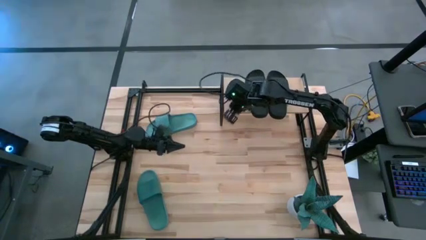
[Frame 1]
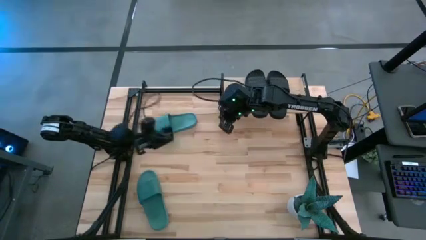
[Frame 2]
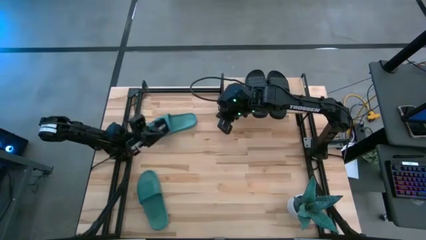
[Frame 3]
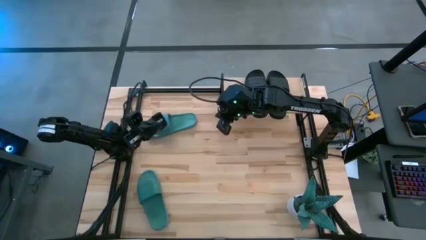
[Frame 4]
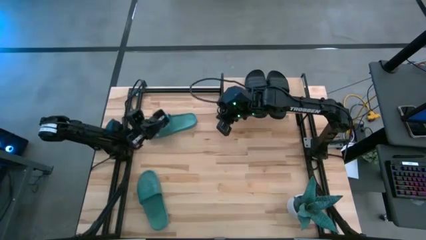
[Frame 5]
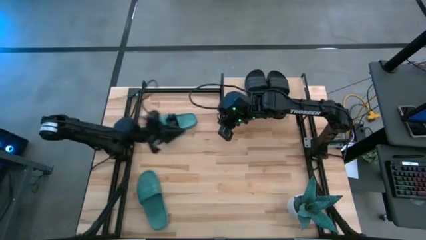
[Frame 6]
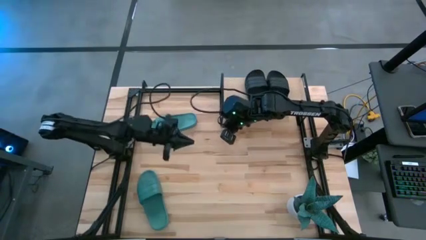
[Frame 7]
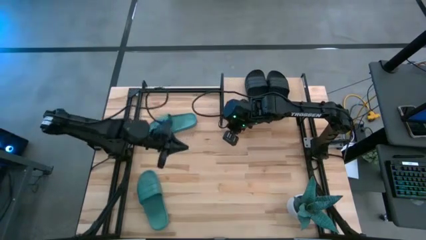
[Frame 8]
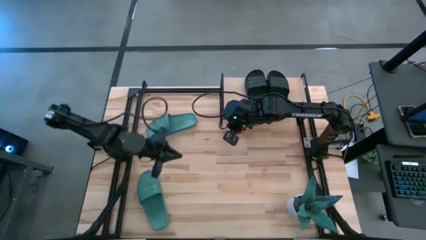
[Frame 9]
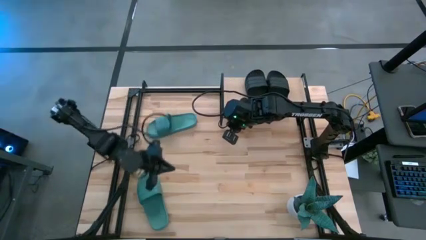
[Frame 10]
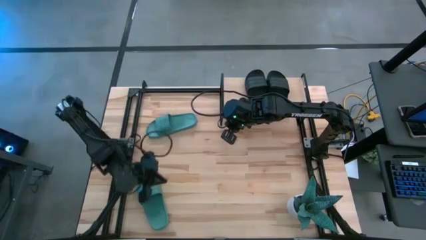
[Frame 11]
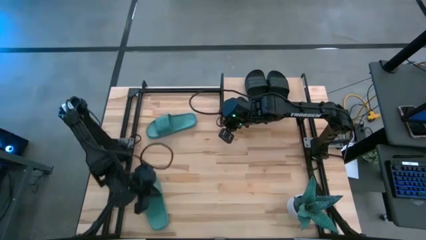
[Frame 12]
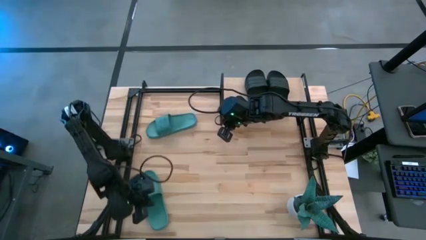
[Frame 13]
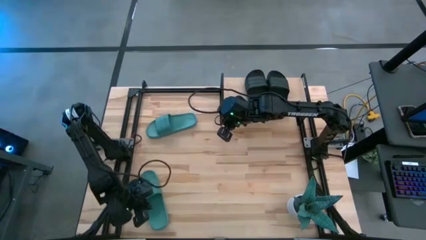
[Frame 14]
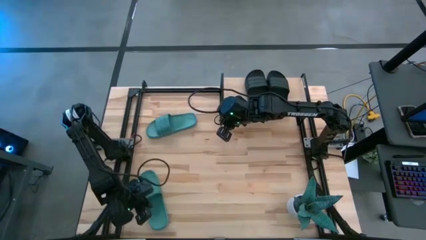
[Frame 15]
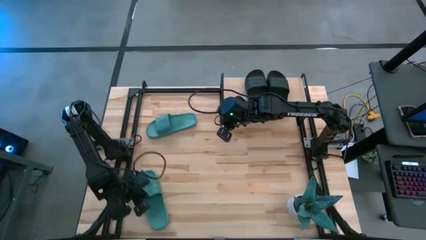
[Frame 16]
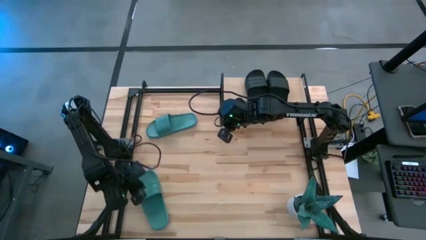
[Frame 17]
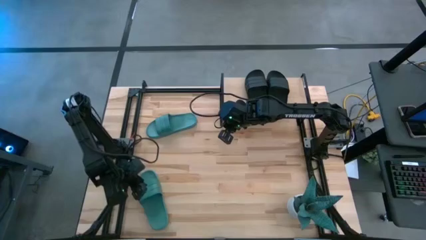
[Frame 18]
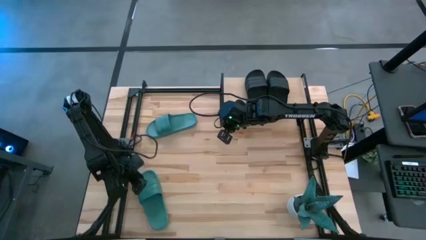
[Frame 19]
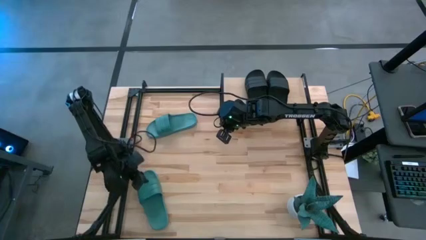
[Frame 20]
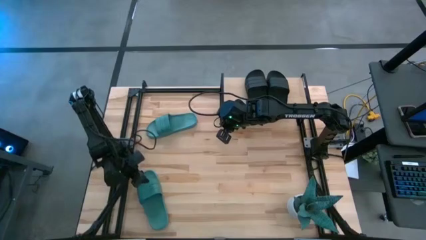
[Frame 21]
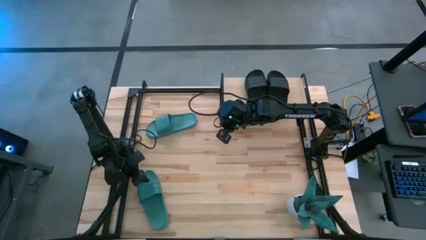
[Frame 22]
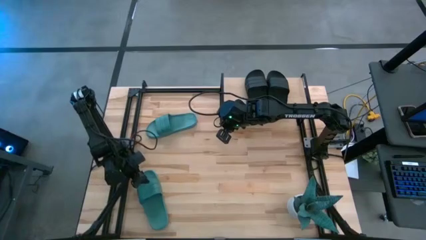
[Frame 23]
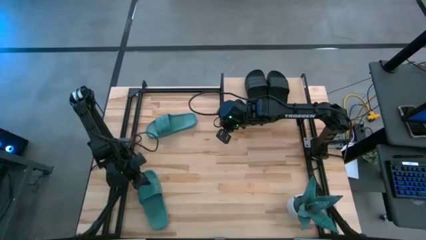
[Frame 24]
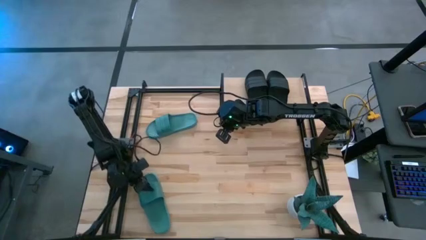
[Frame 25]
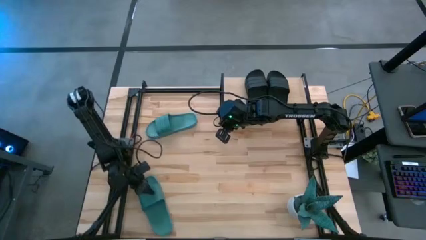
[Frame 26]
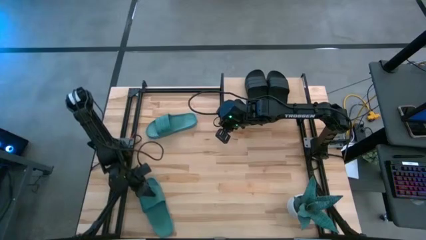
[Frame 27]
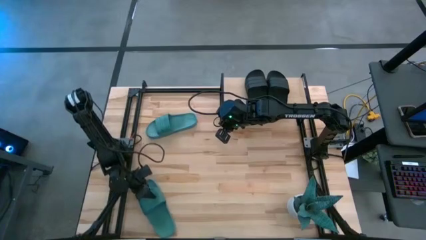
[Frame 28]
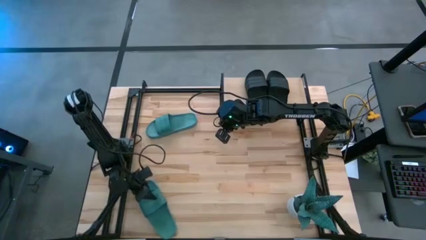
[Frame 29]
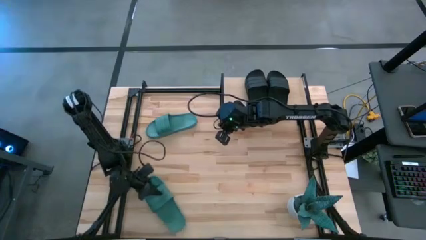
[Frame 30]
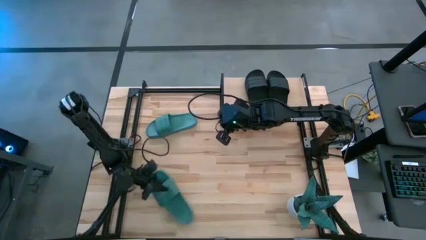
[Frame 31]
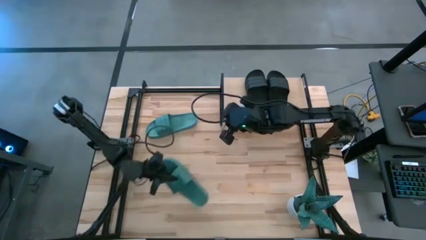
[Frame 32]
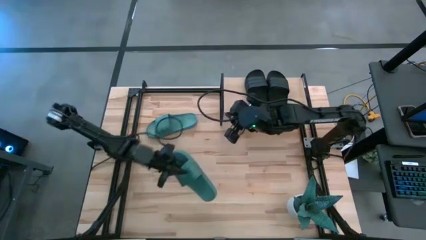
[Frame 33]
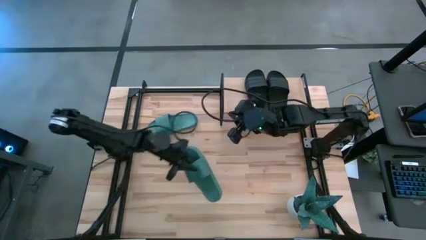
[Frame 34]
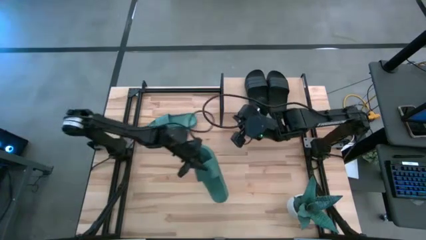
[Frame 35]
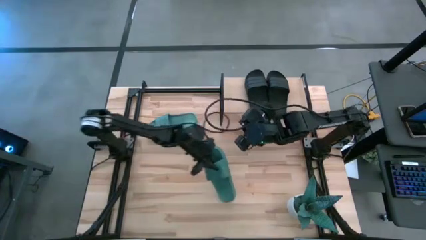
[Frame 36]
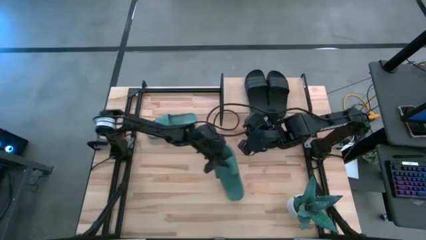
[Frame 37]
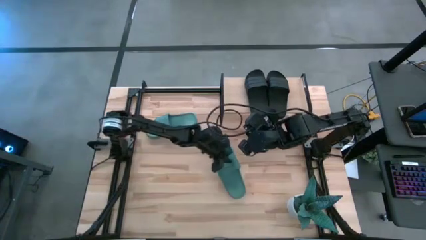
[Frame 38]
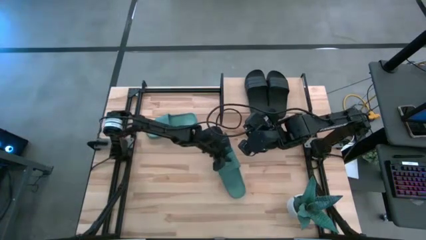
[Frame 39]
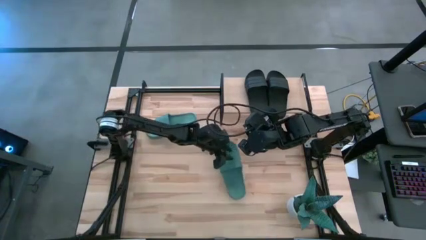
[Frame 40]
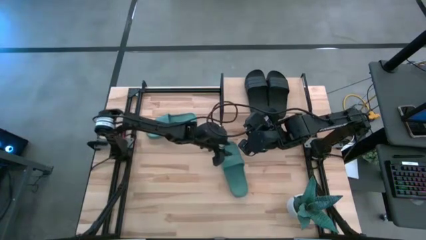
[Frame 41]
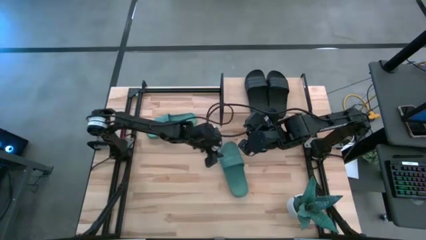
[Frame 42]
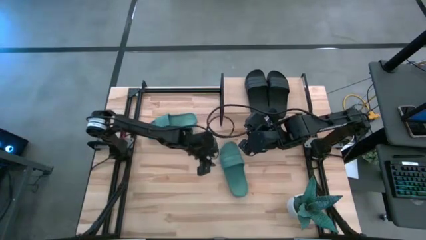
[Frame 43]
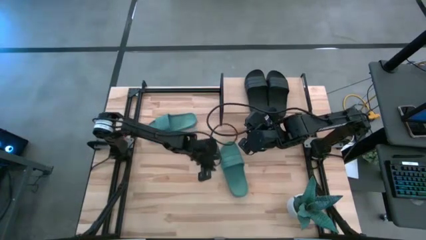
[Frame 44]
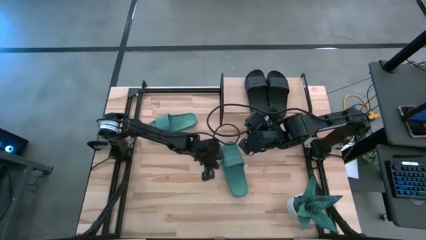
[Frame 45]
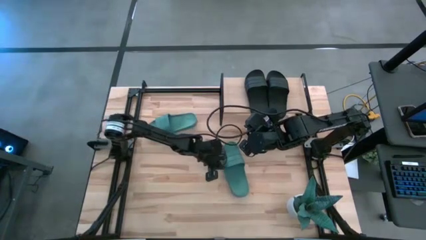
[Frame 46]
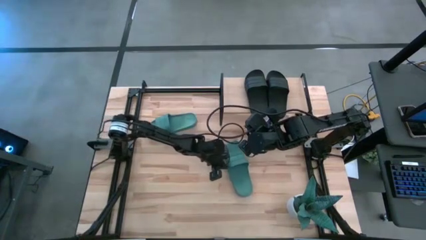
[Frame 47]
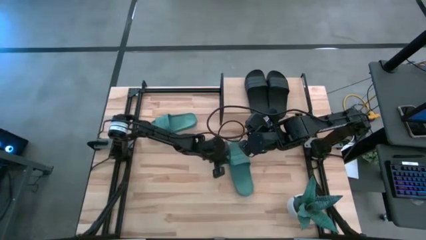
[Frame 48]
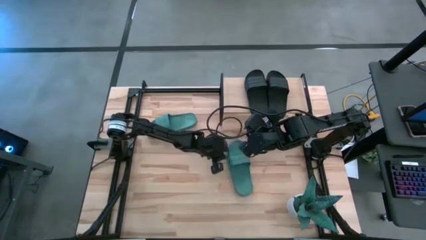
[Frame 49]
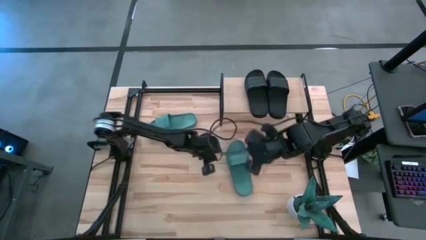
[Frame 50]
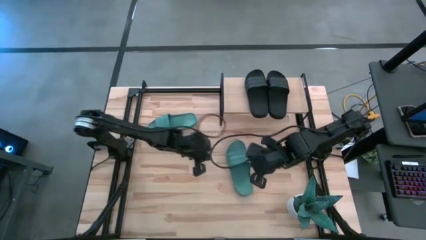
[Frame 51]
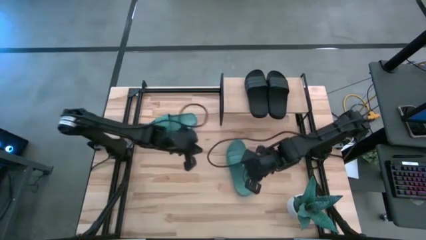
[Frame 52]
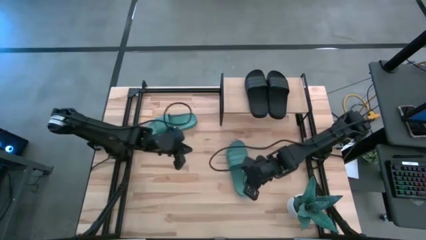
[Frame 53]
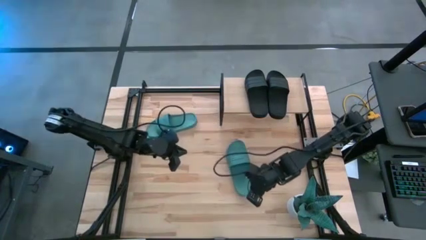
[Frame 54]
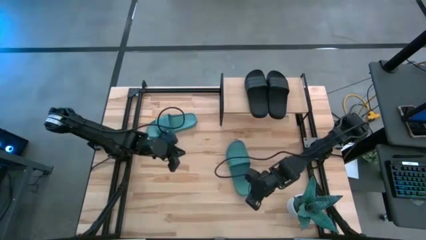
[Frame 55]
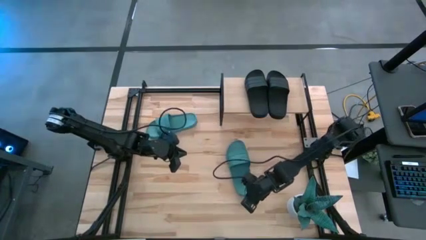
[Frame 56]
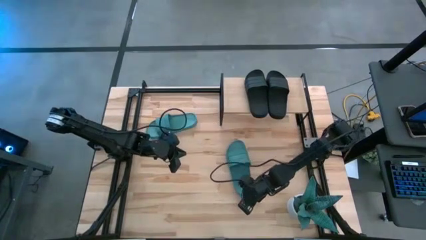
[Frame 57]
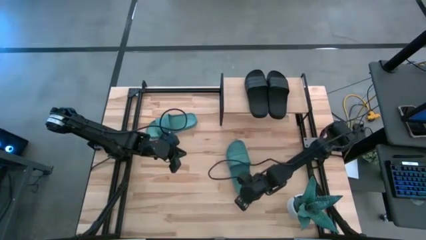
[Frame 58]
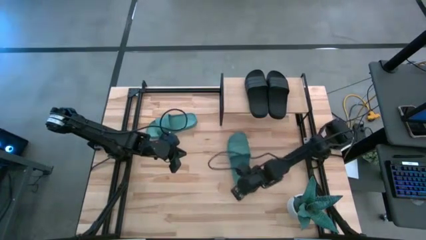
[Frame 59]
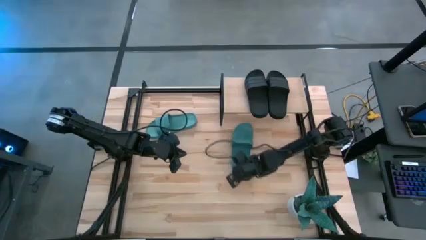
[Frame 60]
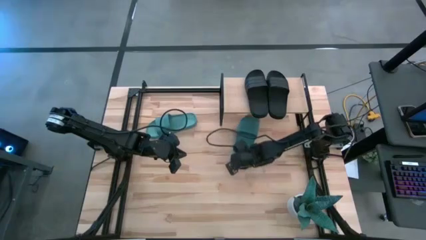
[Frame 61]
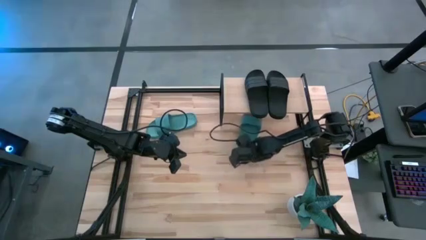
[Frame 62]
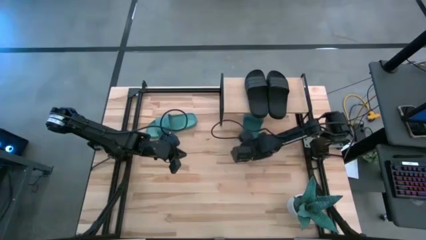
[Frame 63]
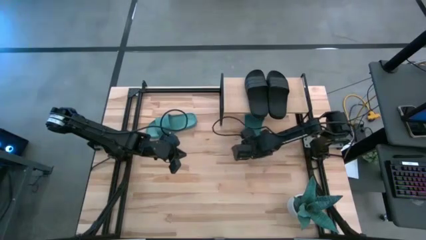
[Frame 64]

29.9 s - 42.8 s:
Task: Pick and place slides into the shelf
Put the bottom green slipper under the shelf

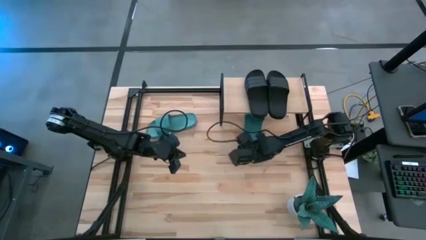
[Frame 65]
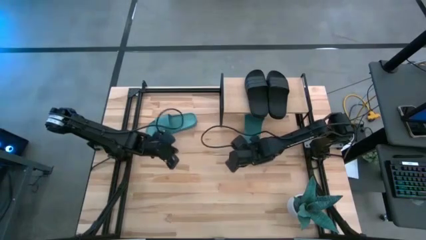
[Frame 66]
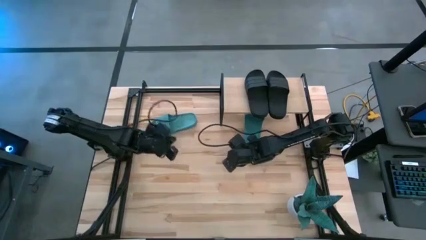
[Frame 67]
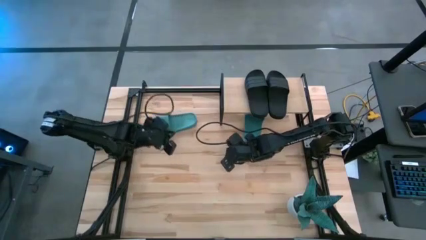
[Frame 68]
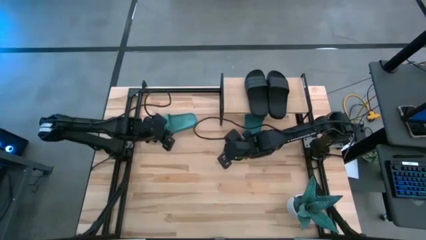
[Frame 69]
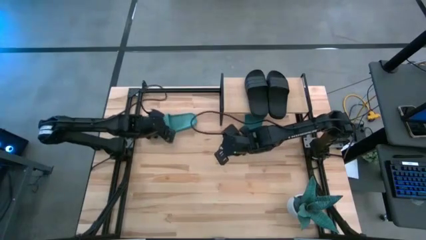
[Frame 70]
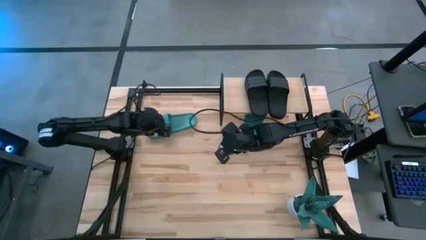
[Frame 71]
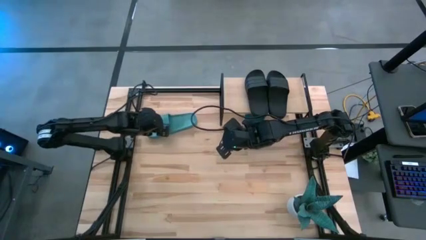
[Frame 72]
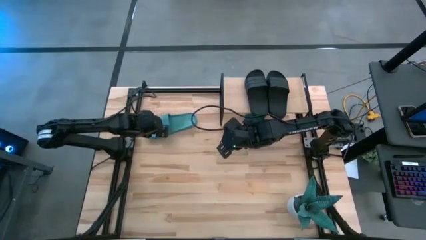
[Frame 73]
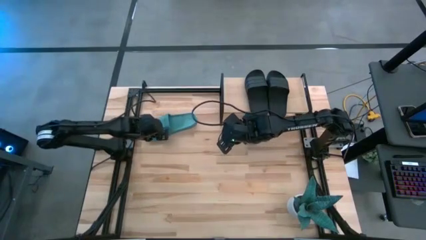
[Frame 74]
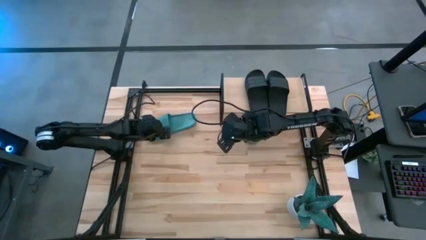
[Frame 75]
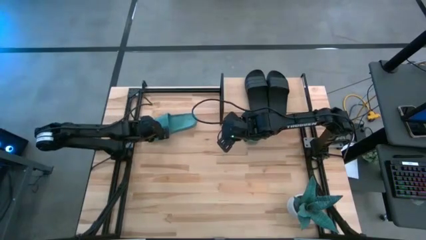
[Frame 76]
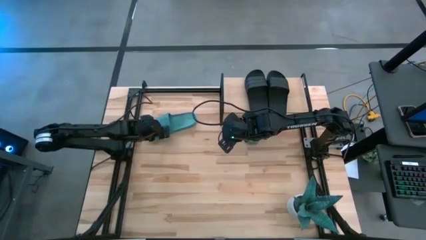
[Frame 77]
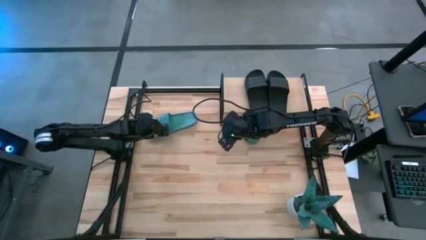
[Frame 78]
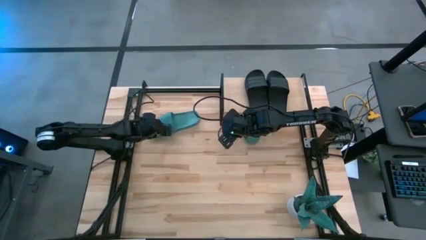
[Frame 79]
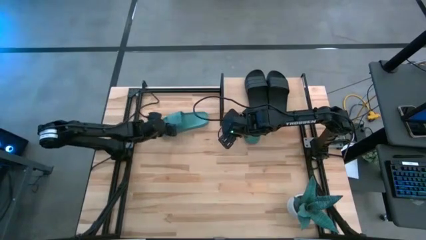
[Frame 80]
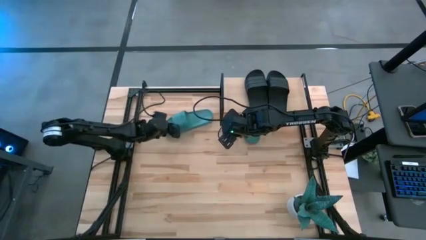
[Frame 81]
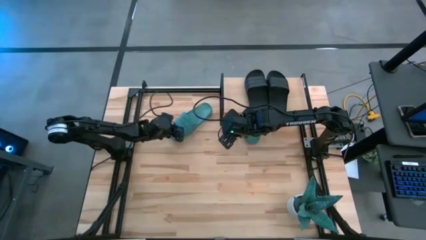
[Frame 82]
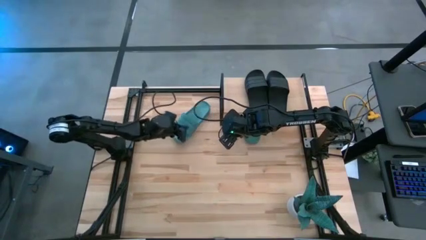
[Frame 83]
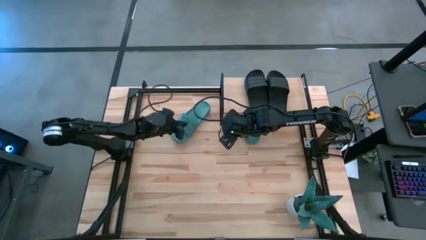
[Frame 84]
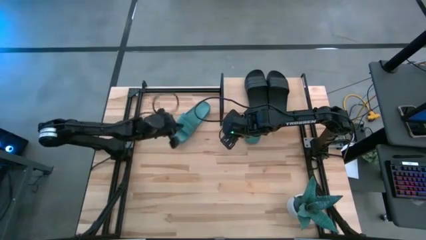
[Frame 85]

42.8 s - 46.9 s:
Put the green slipper under the shelf
